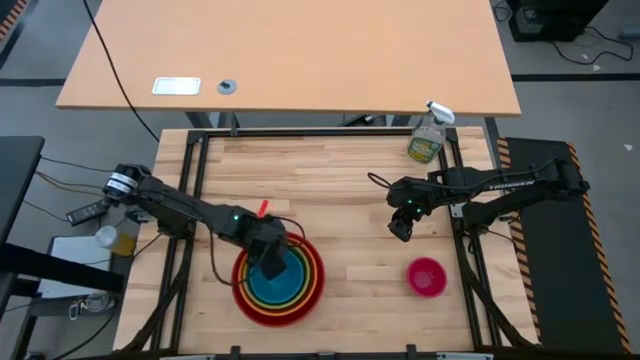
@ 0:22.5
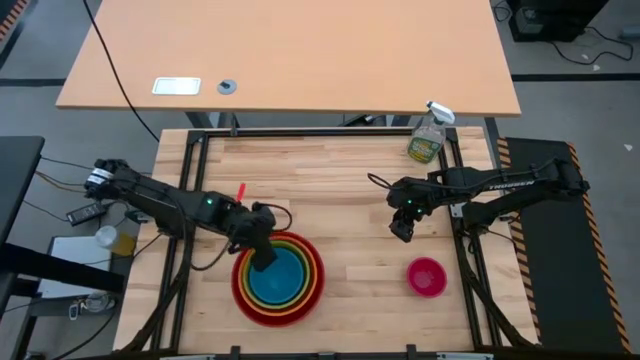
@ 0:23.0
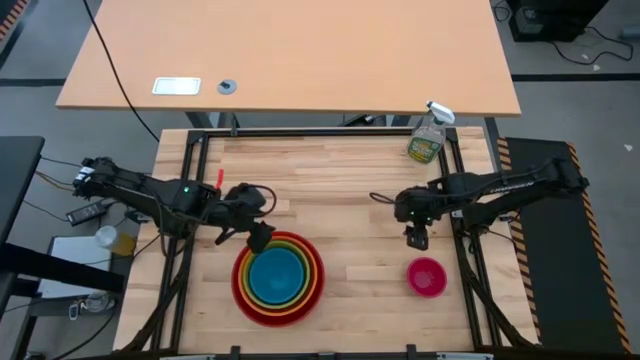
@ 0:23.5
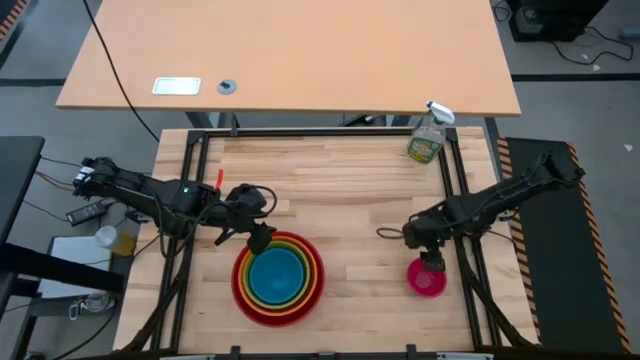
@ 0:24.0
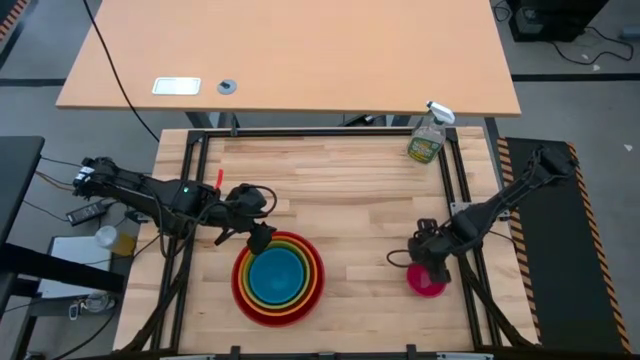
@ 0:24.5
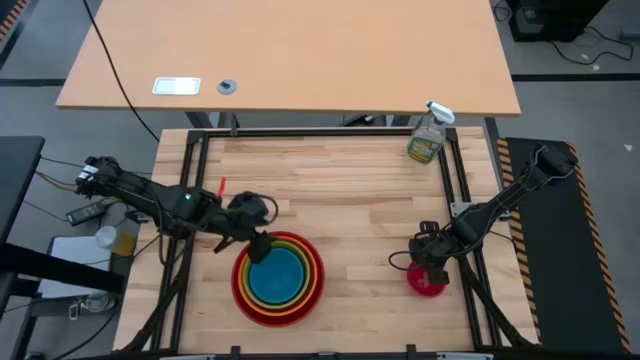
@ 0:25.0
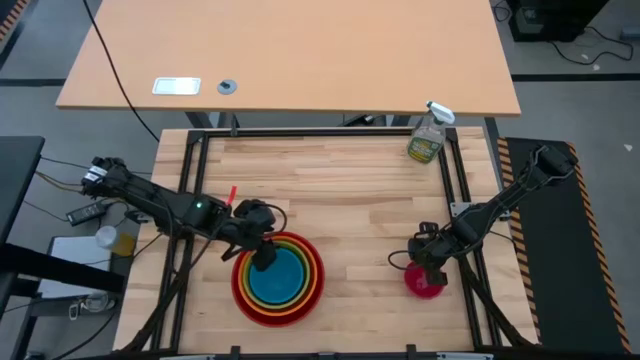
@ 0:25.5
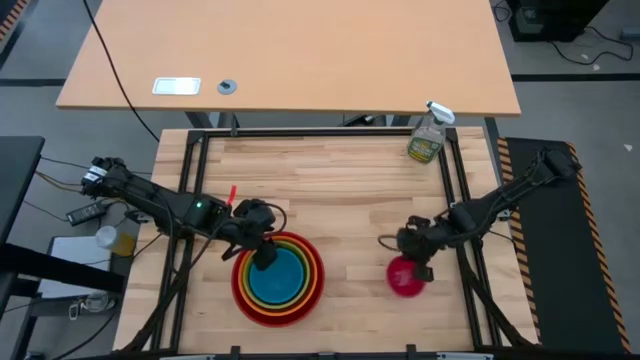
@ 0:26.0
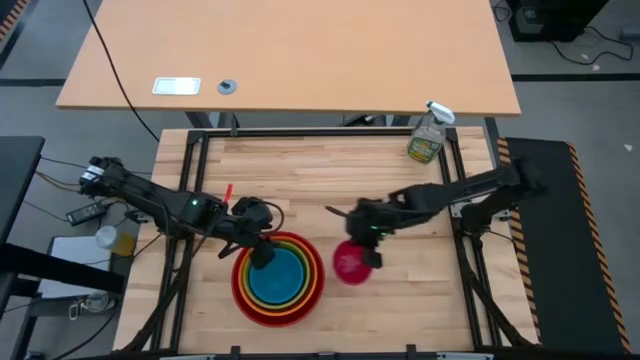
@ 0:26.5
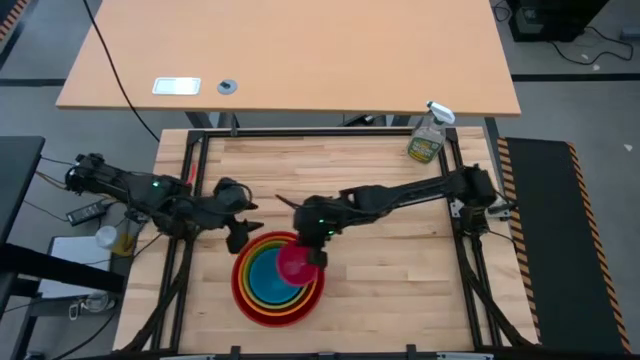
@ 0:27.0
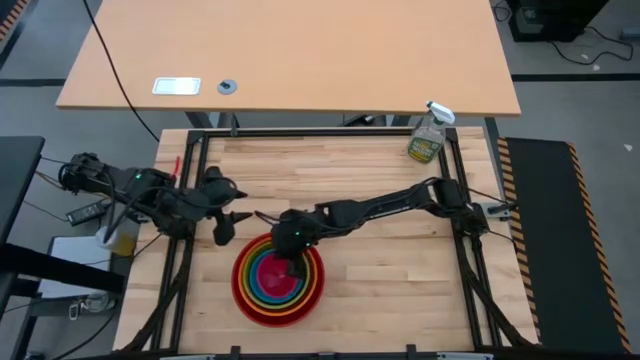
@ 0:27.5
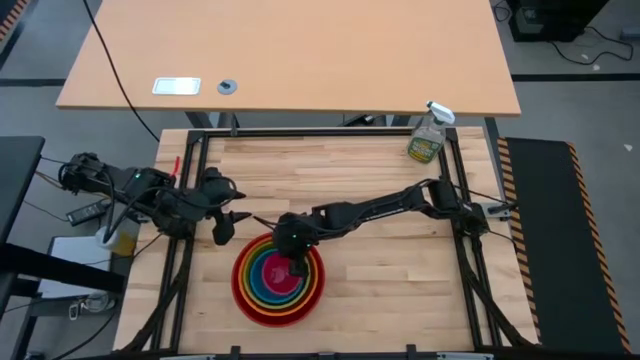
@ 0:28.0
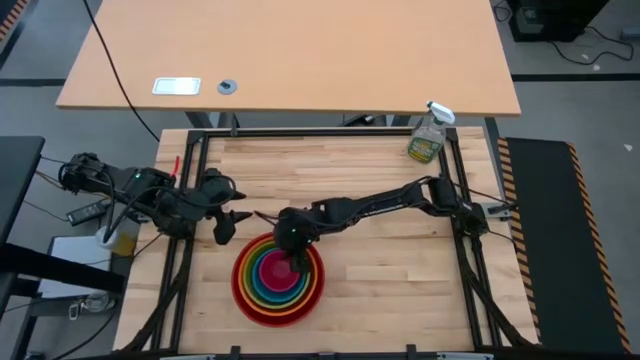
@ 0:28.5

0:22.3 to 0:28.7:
Stack the small red bowl into the blue bowl

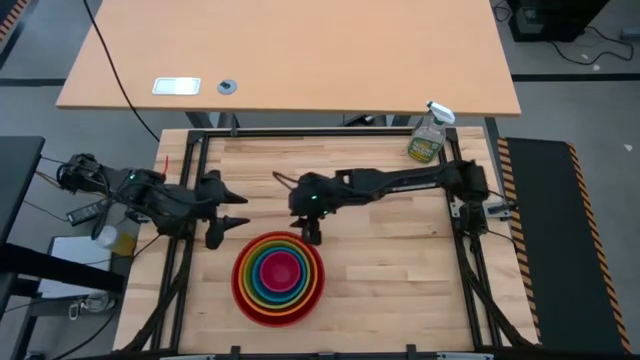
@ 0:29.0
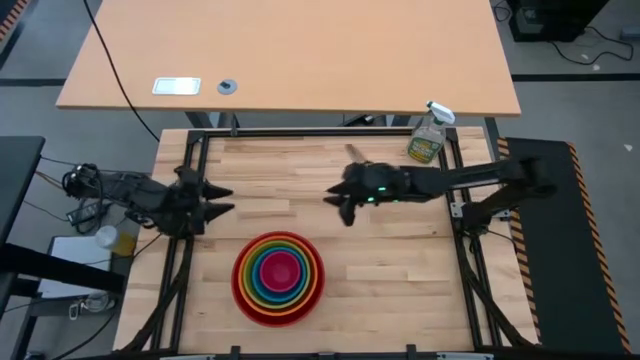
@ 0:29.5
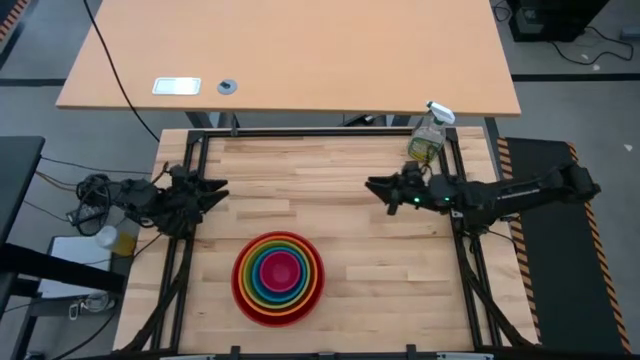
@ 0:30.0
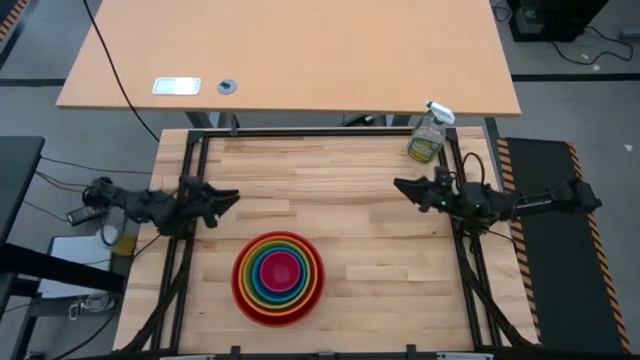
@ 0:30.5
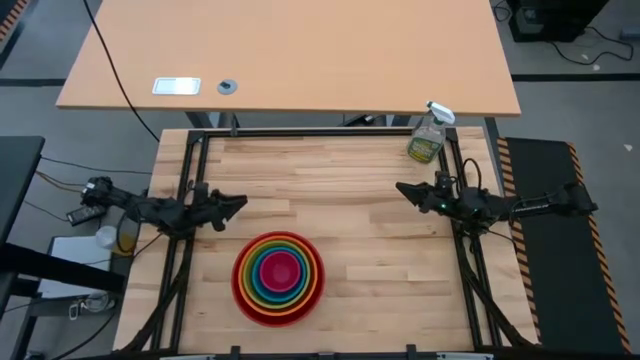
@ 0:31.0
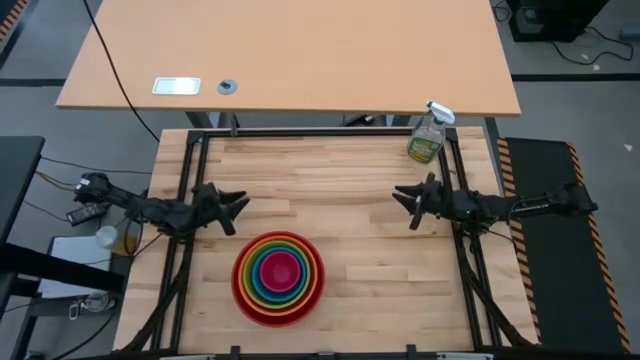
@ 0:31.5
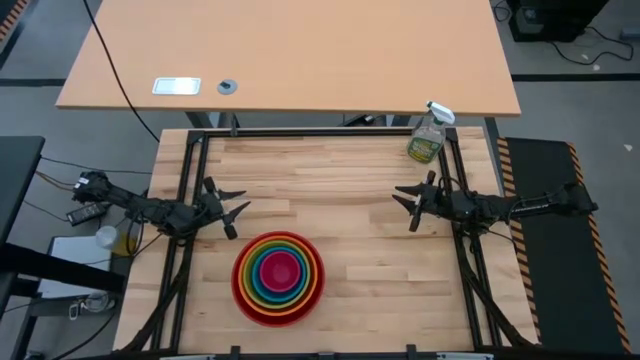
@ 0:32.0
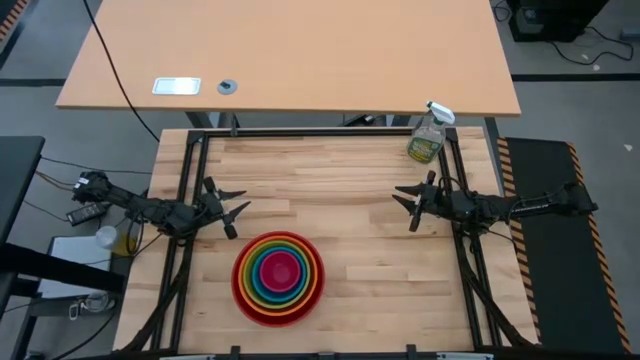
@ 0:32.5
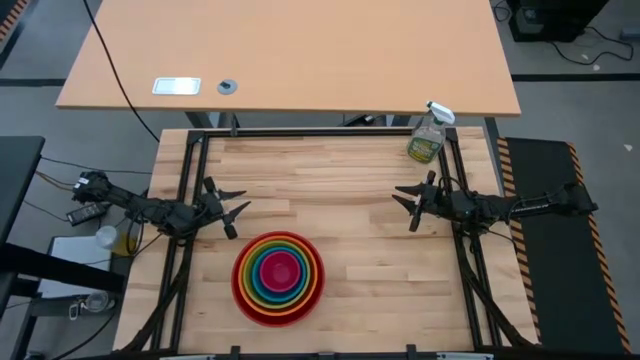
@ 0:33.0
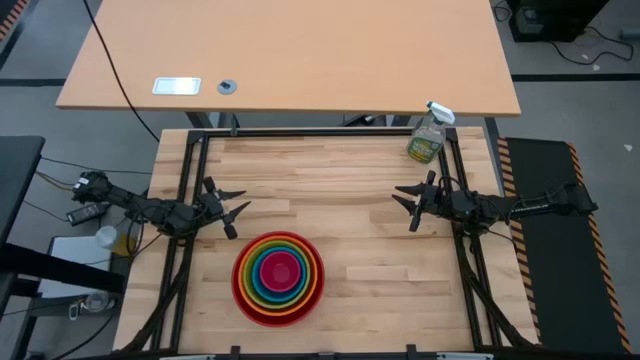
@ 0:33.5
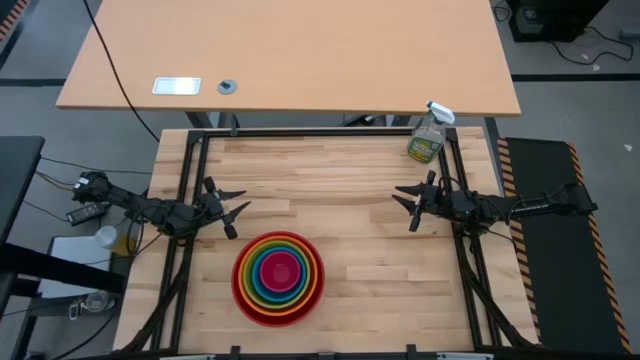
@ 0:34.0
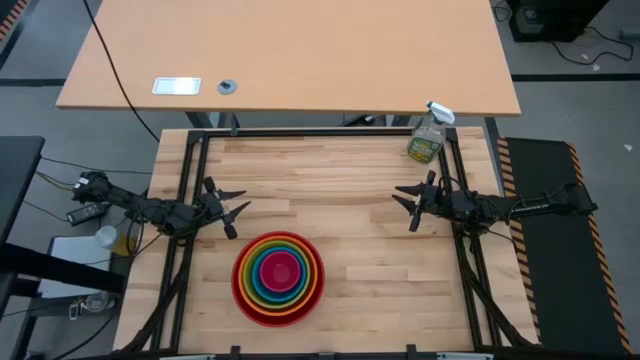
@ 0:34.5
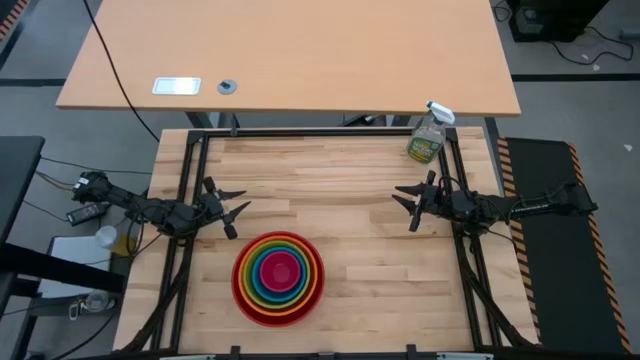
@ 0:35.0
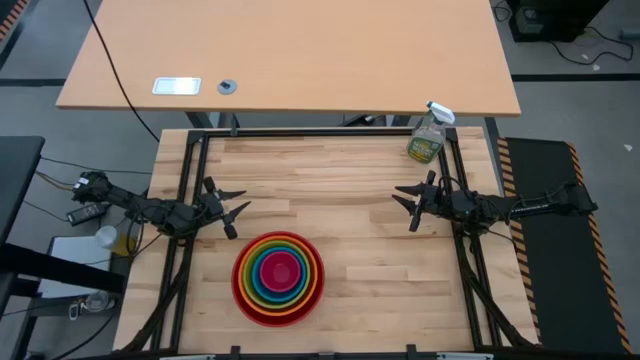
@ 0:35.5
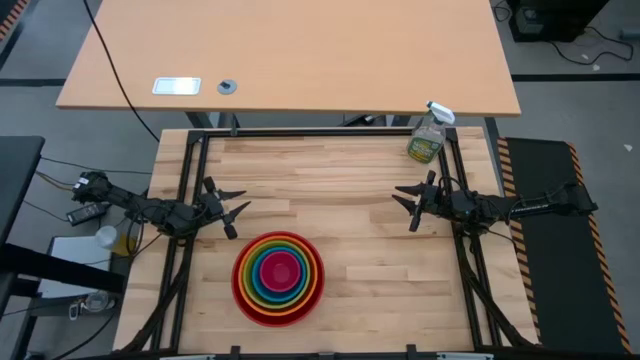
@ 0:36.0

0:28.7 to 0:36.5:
Return to Home Position
